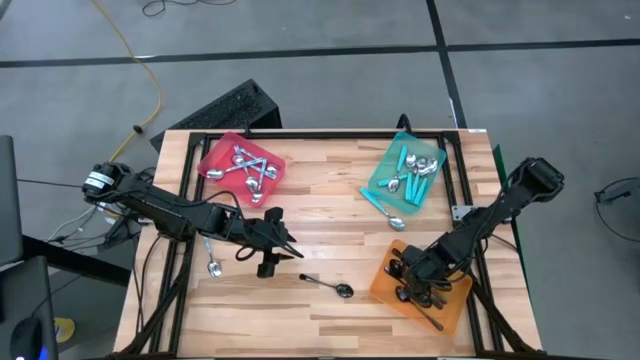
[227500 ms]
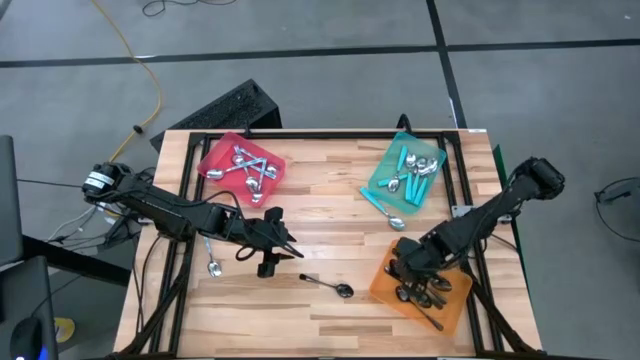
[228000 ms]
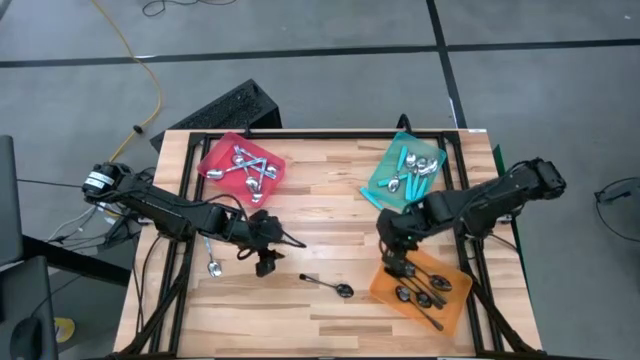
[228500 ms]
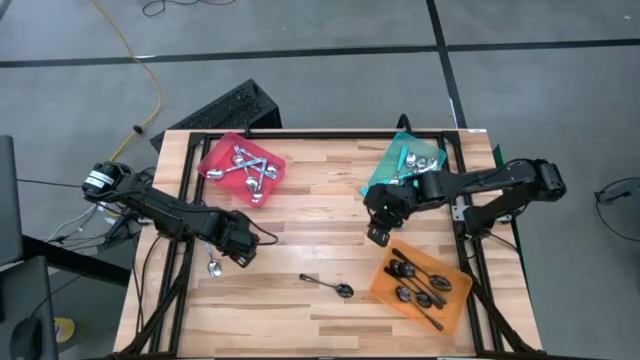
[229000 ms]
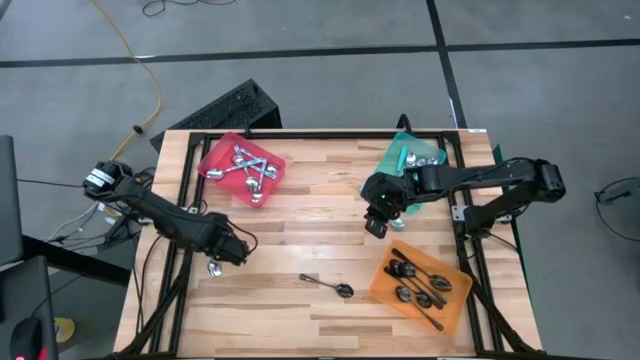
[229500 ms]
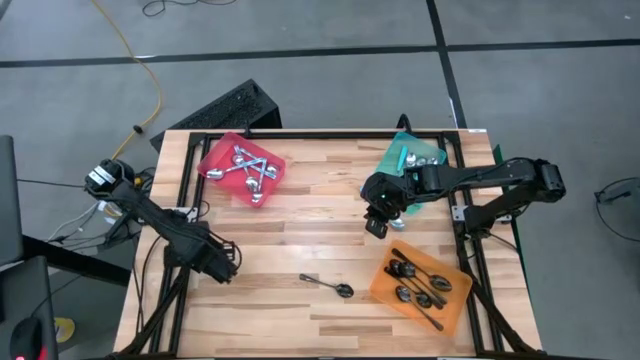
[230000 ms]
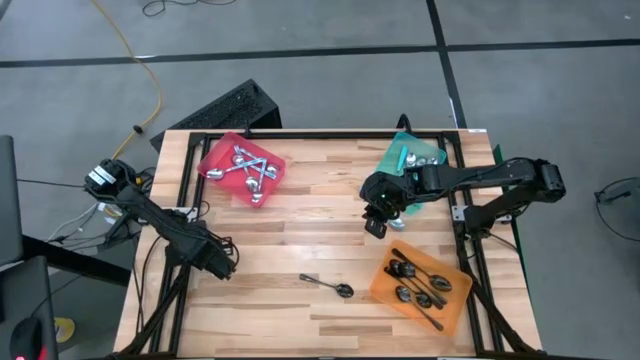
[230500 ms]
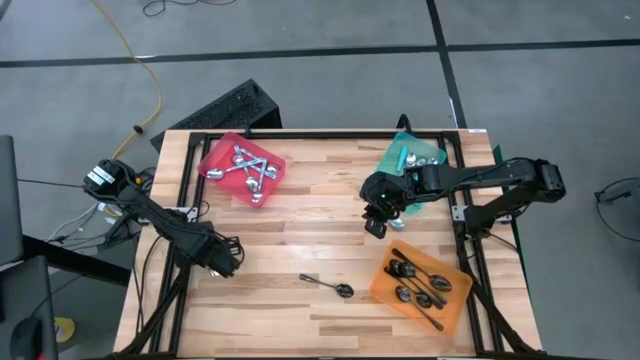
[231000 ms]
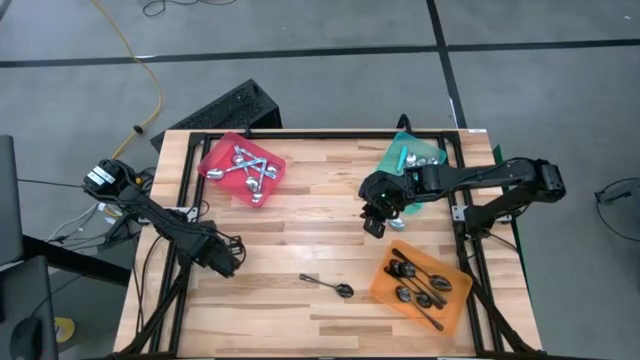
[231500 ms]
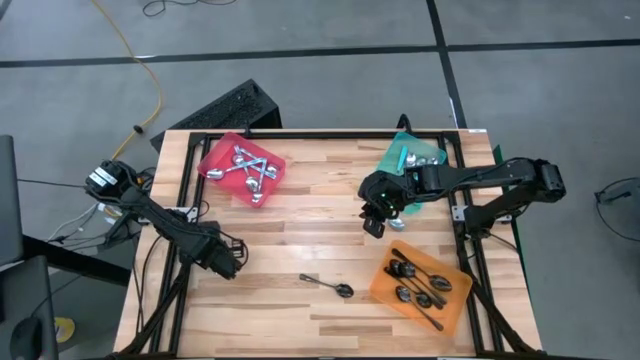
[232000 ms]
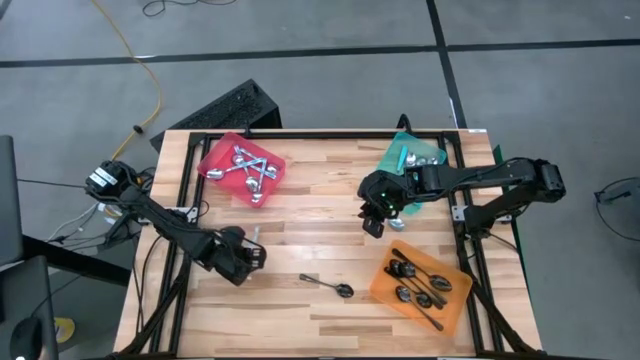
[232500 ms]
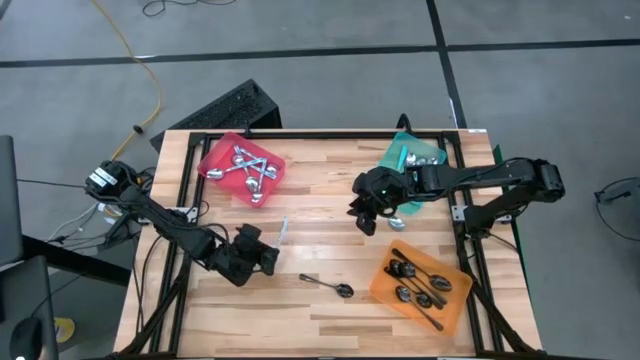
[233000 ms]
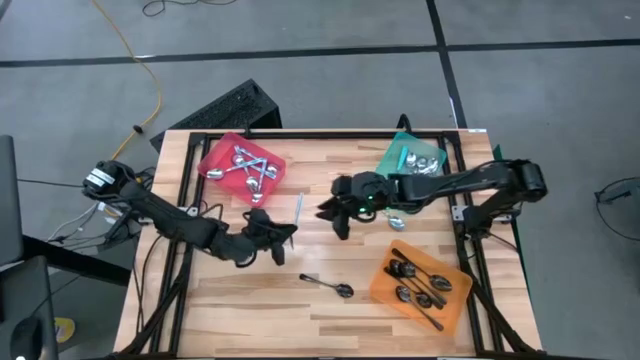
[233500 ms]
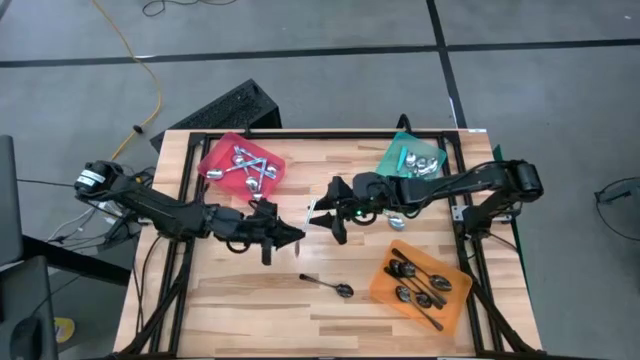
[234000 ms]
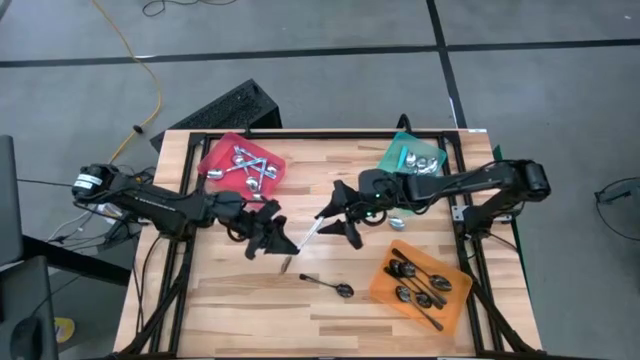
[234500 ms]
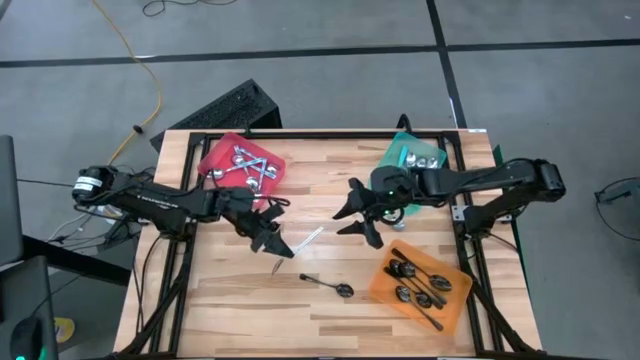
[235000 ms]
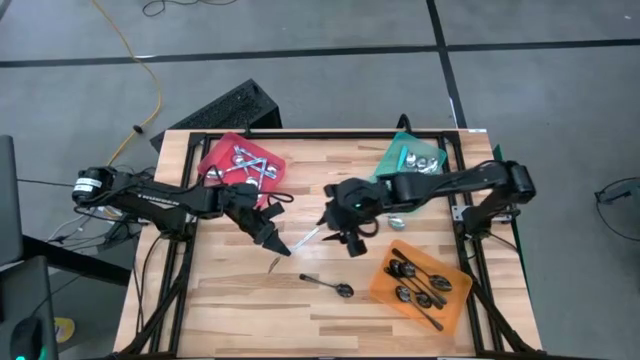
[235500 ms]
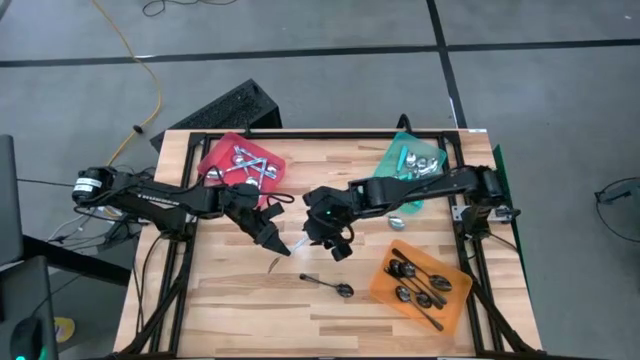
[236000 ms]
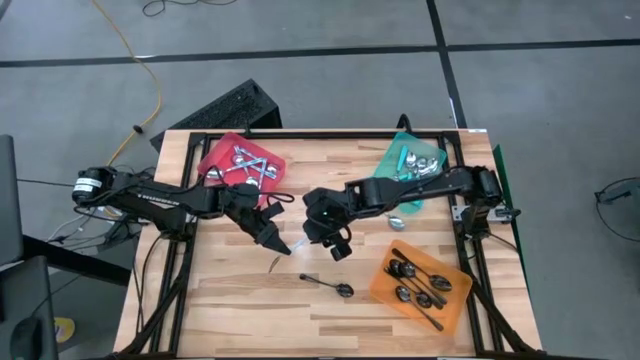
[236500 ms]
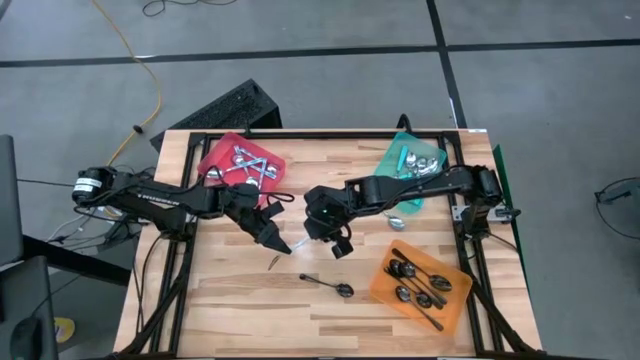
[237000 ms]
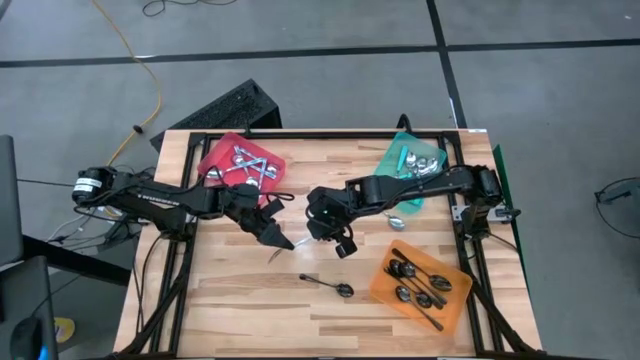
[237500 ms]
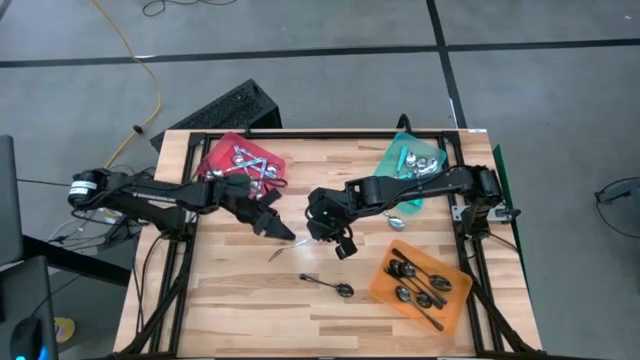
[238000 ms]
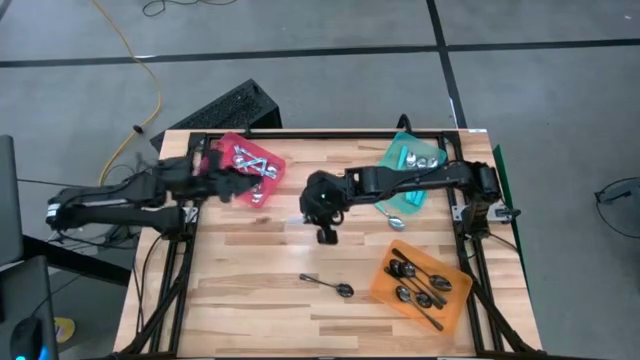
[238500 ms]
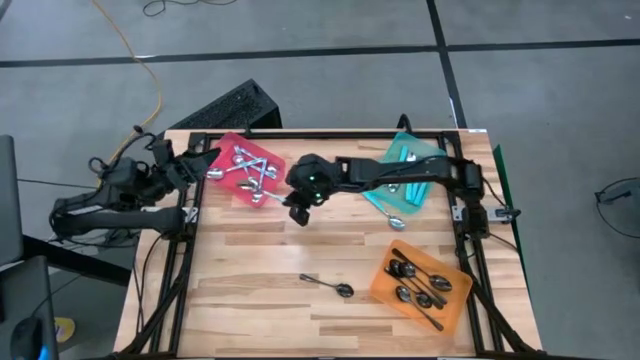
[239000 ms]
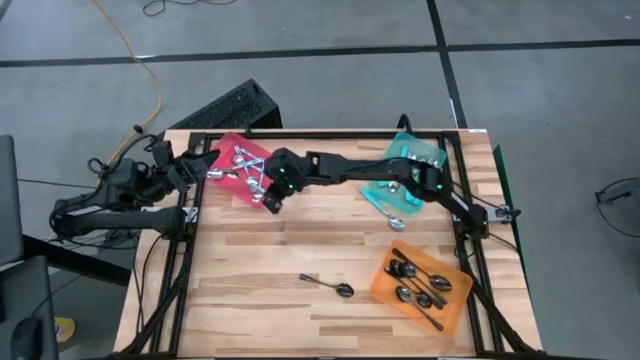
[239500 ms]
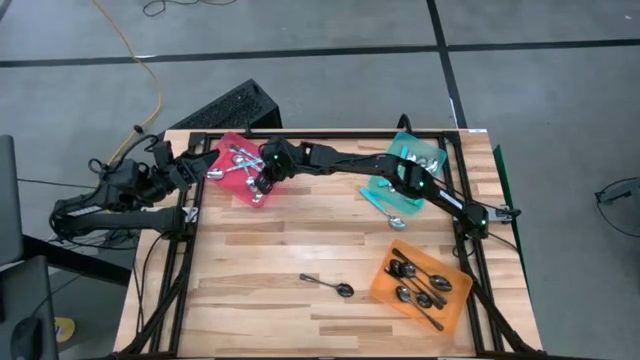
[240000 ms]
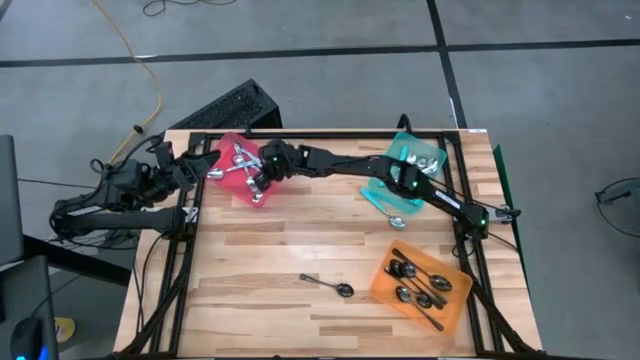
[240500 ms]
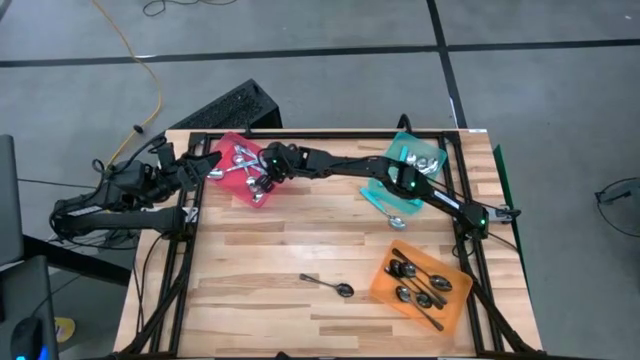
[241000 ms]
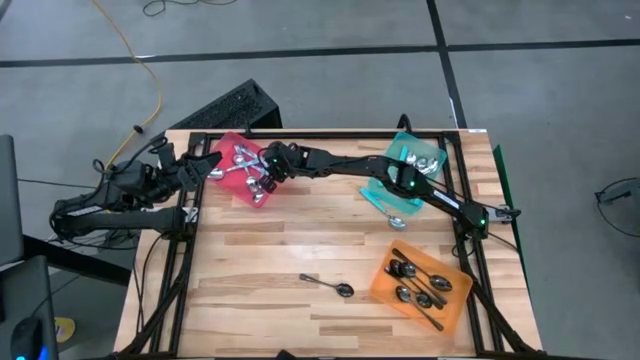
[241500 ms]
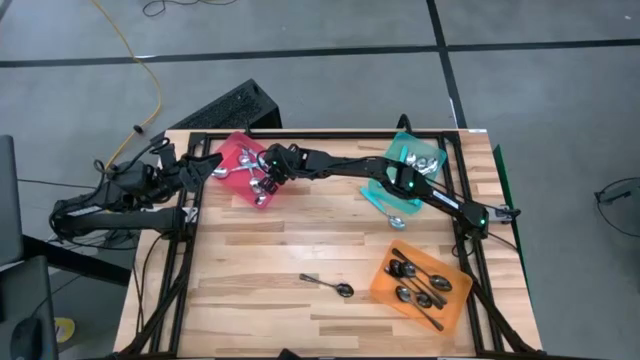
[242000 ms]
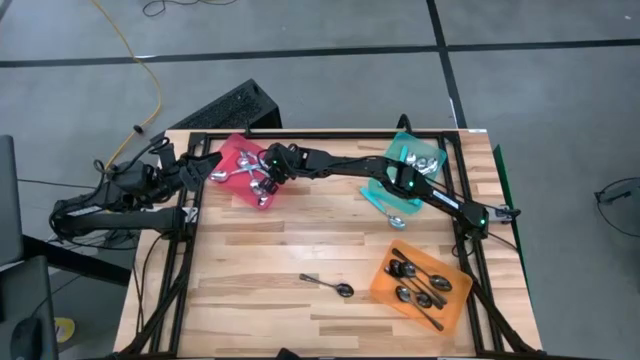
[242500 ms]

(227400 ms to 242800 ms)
Task: Sort silverware by color (type)
Put the blue patterned spoon into the red bin

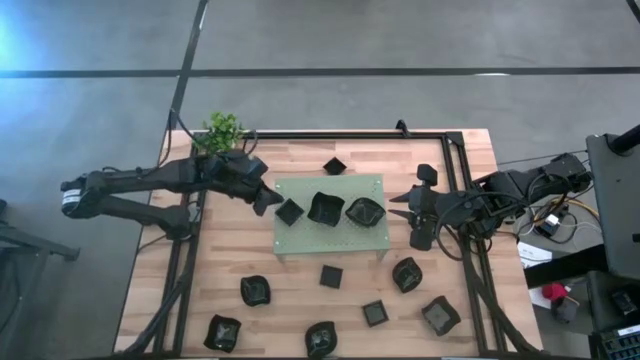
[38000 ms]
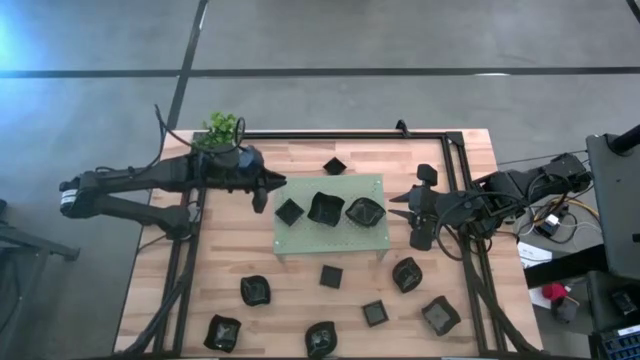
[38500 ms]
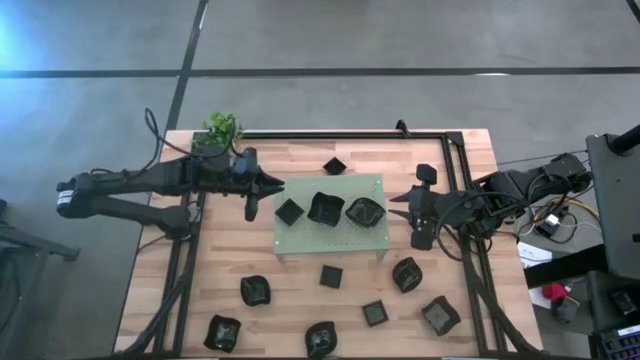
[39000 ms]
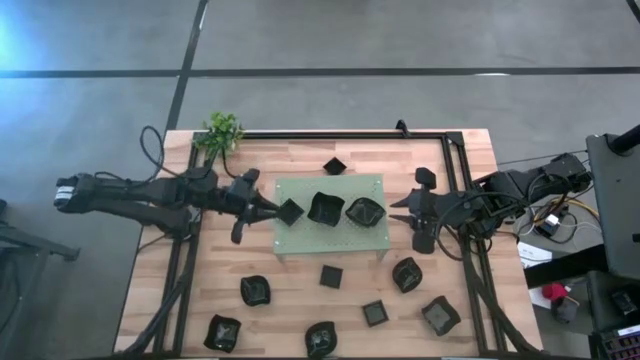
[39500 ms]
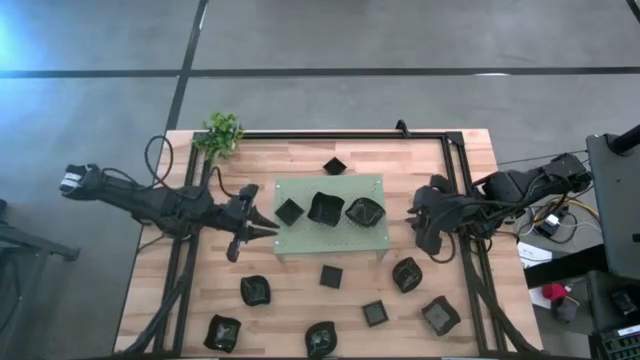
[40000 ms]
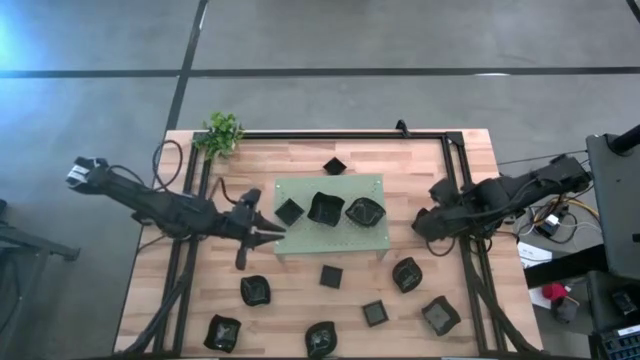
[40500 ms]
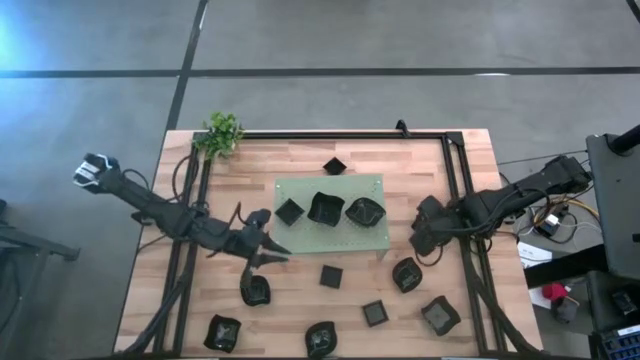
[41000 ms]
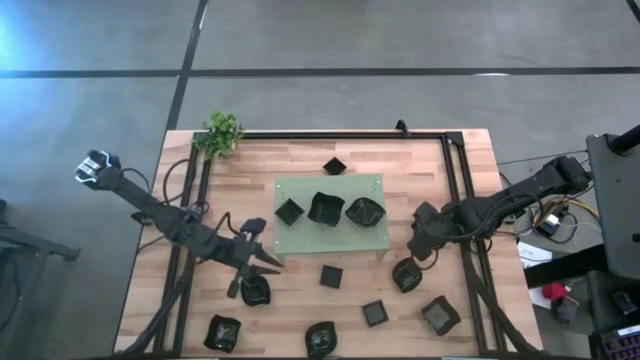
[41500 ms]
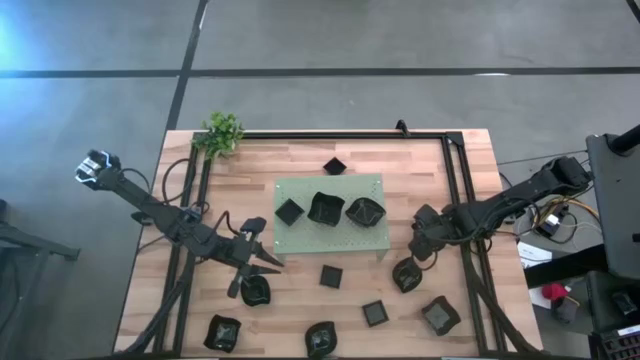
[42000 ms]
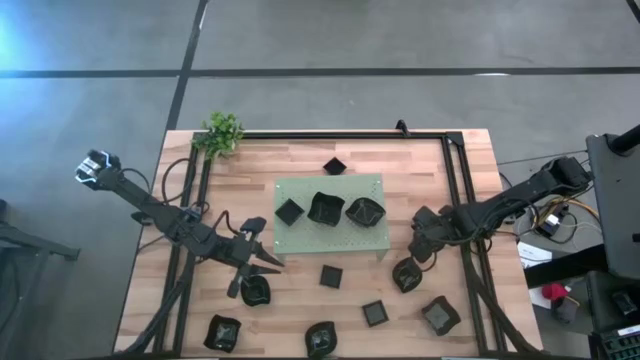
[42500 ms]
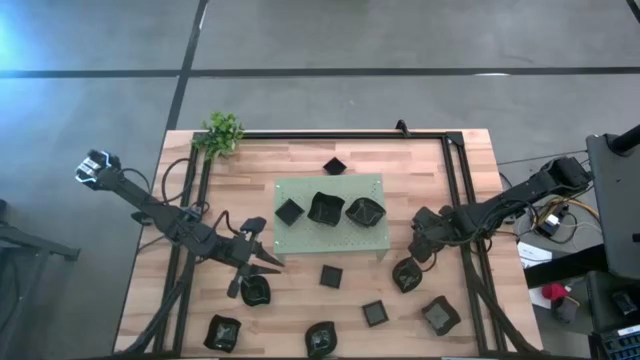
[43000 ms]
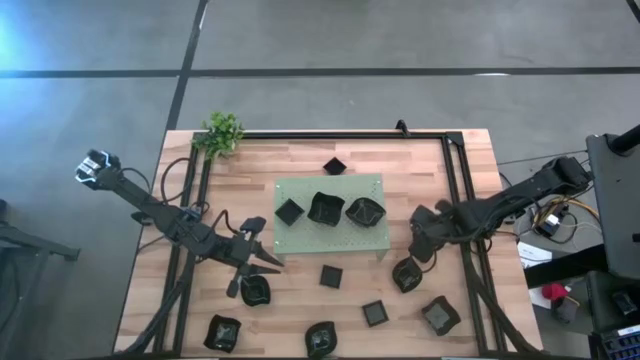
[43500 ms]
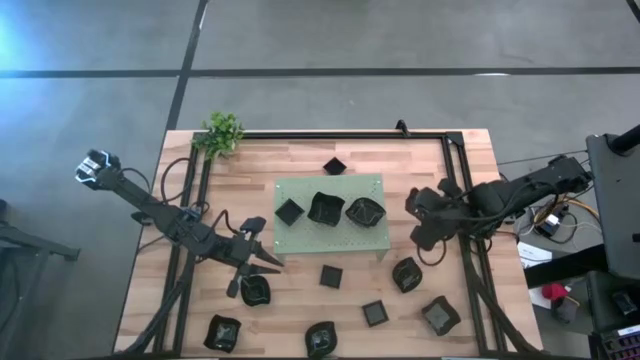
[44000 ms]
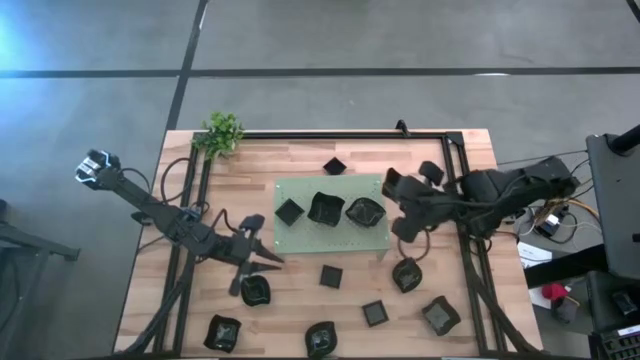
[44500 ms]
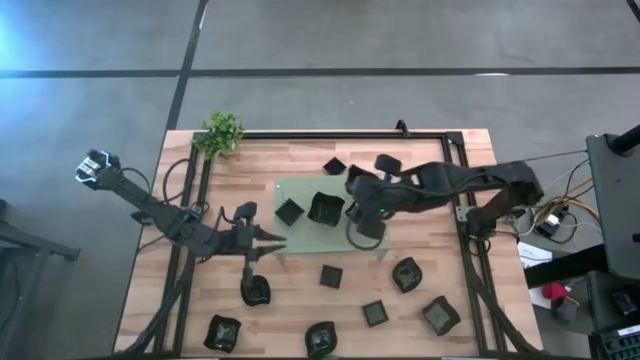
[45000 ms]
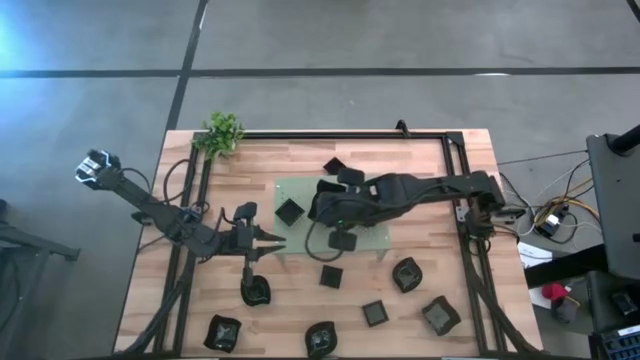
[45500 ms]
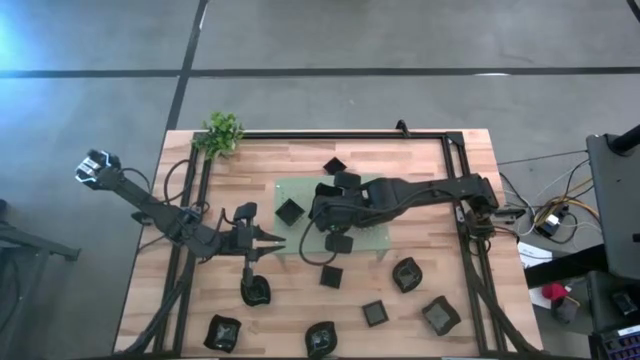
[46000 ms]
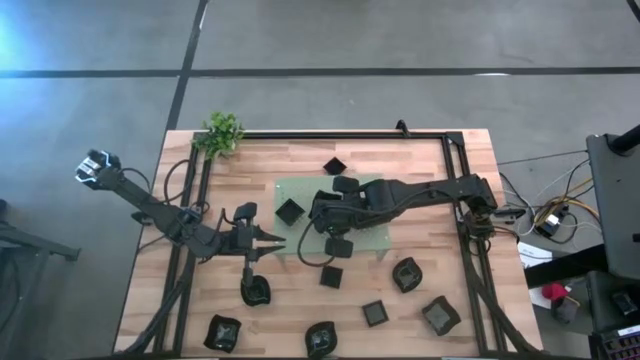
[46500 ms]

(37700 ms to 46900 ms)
Task: Pick & Place Mini shaped plates
Stack the distorted square plate on top of the distorted square plate on the shelf
